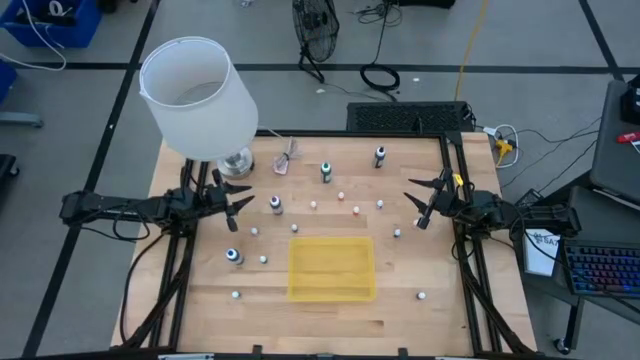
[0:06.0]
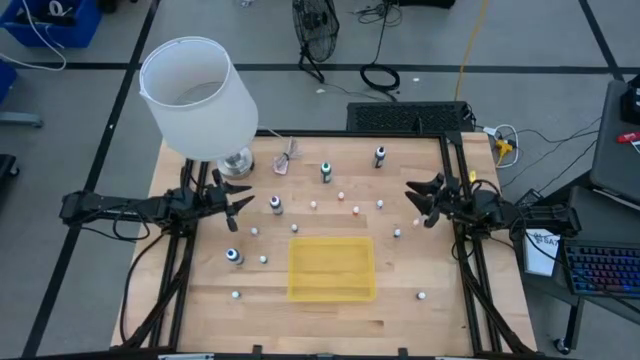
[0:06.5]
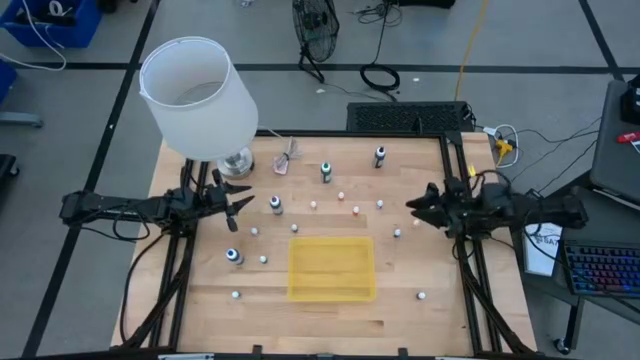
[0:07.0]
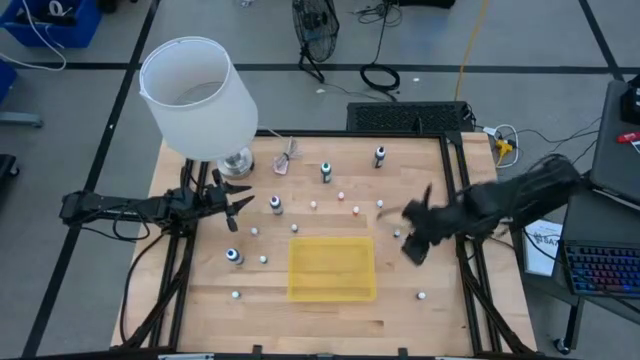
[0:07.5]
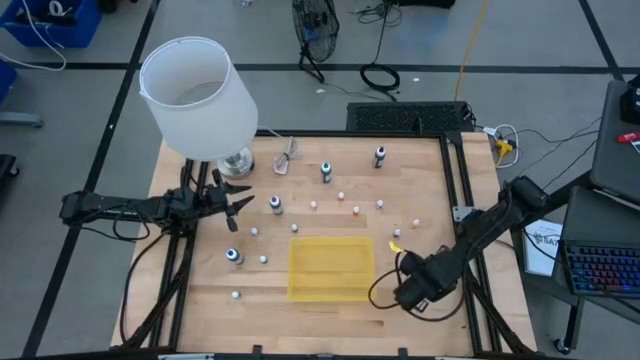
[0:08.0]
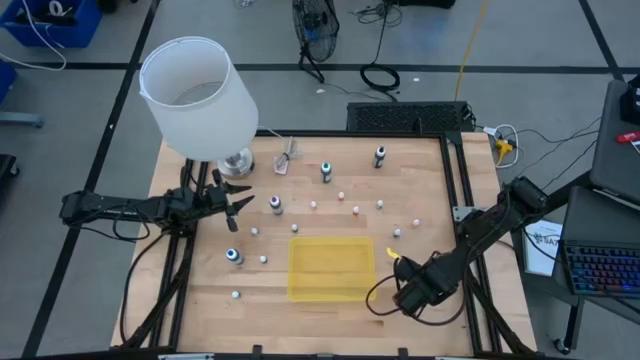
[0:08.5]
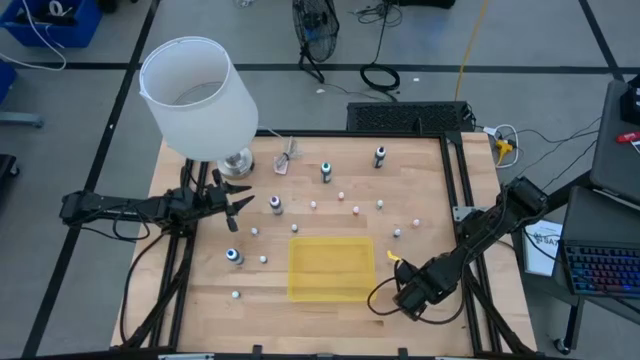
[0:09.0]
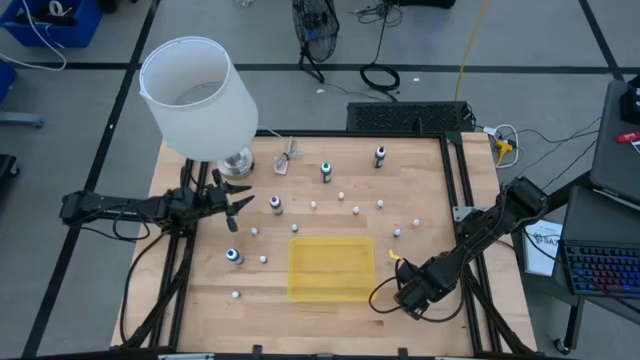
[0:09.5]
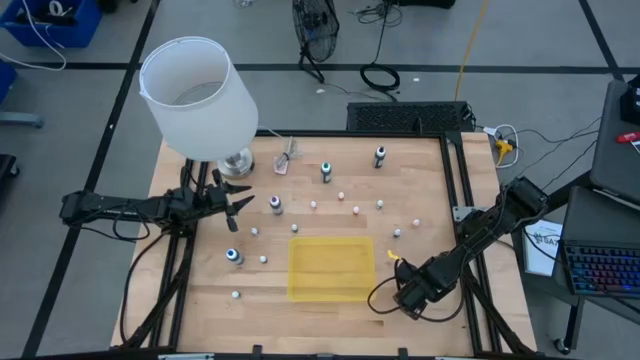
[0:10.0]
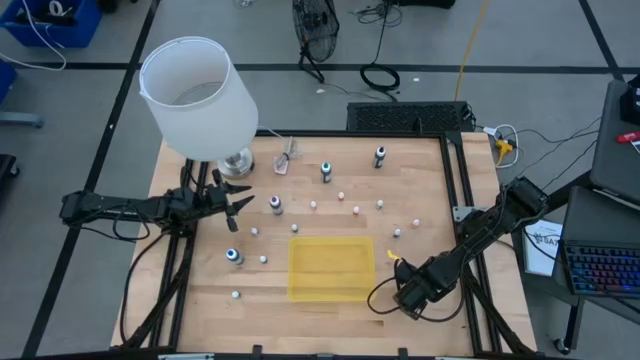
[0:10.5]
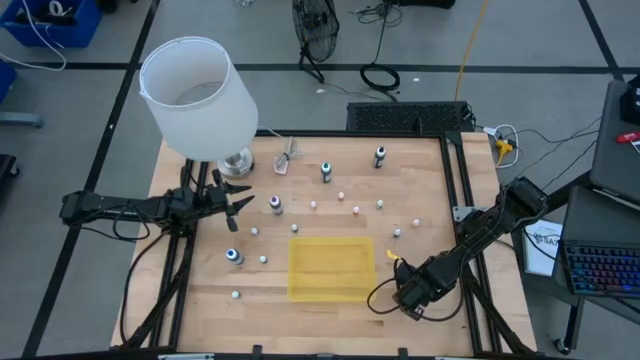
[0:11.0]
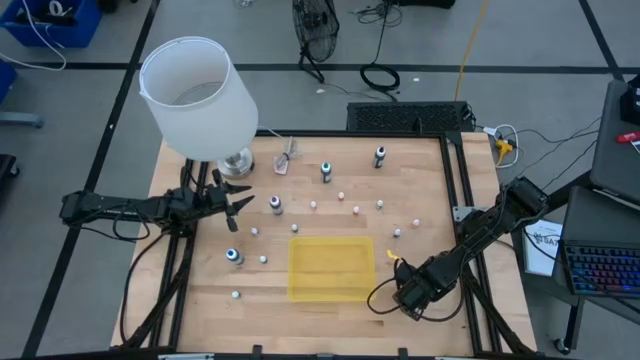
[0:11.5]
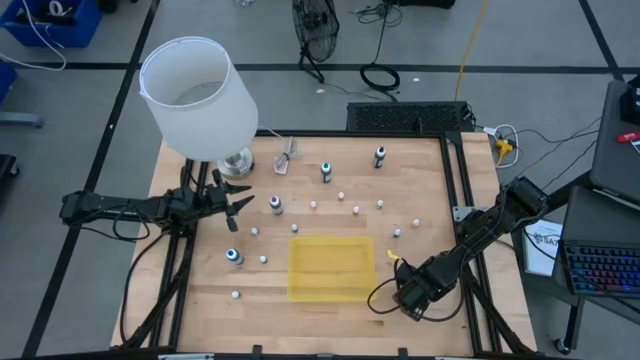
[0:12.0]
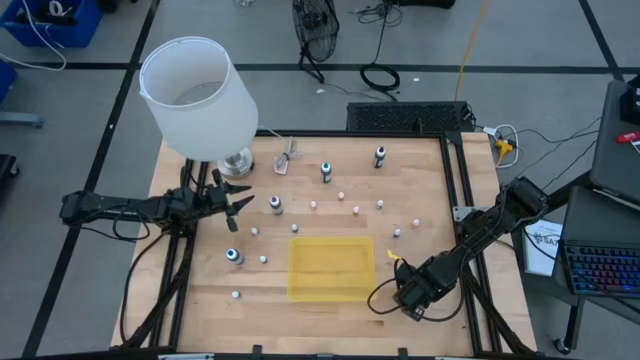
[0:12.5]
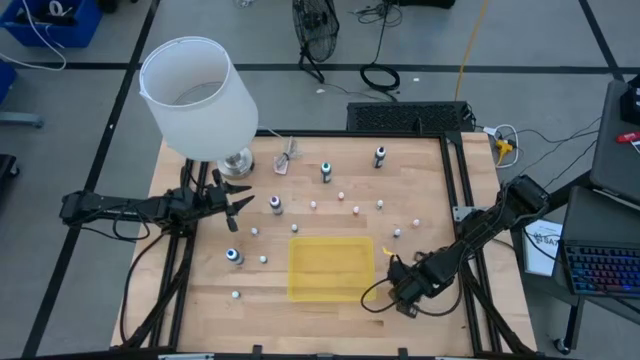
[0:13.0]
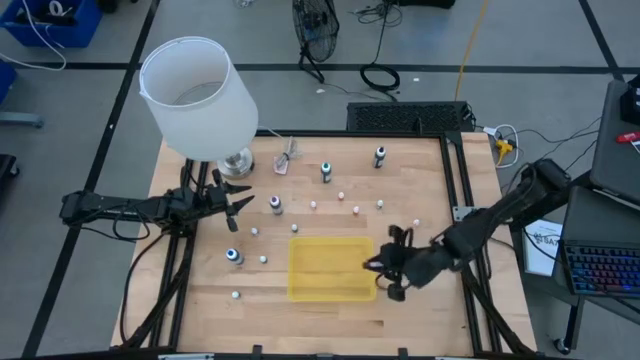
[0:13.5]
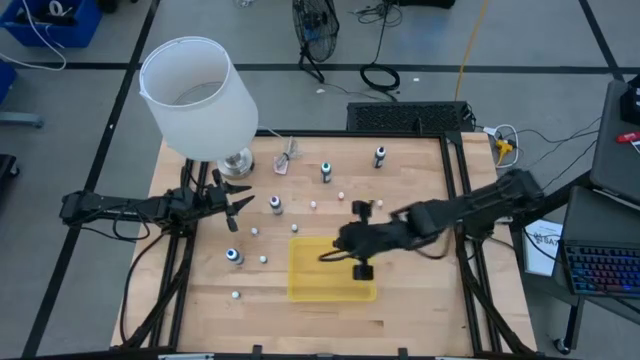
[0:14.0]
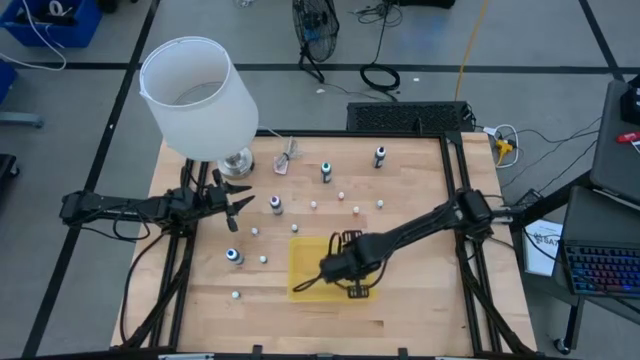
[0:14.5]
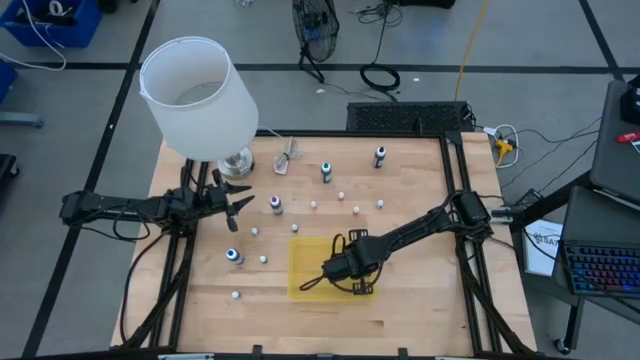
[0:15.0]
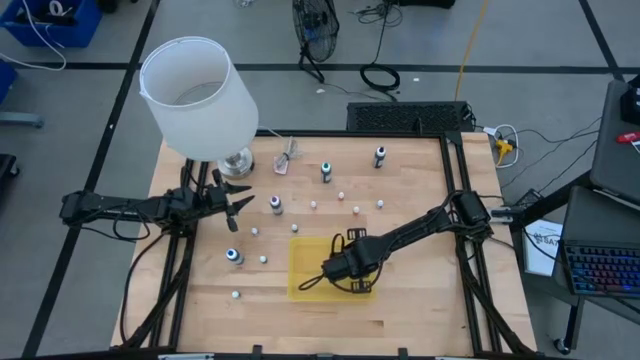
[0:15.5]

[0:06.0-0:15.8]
Task: Pick & Place food coloring
Put the small red food coloring bottle into the yellow container

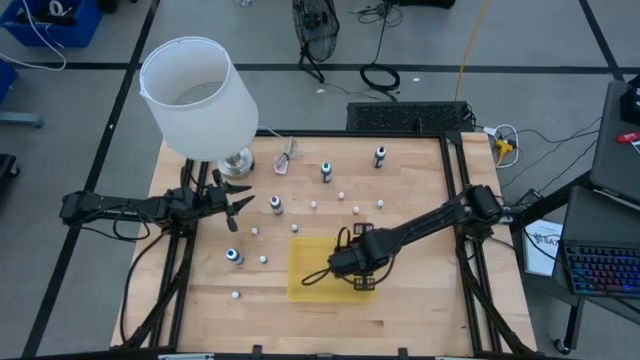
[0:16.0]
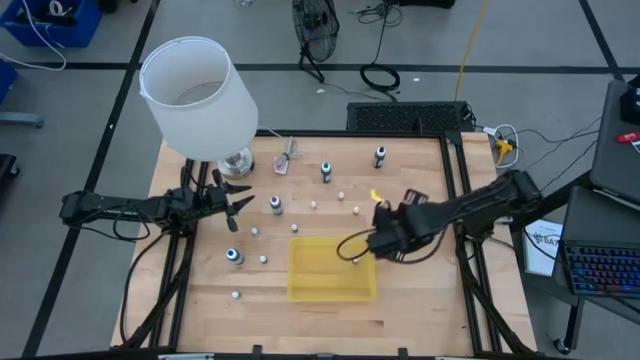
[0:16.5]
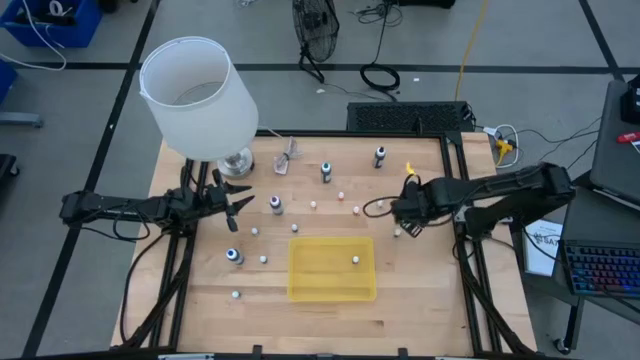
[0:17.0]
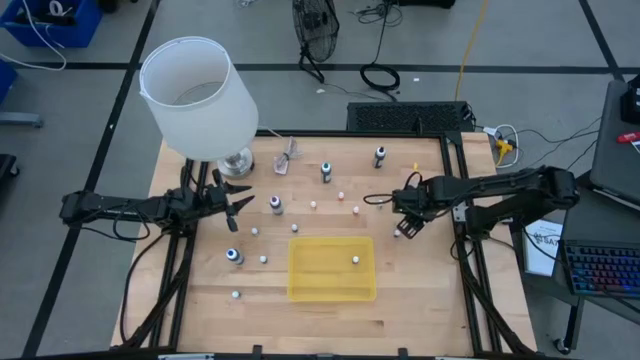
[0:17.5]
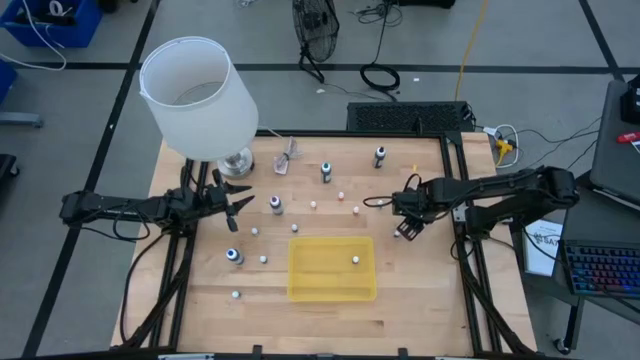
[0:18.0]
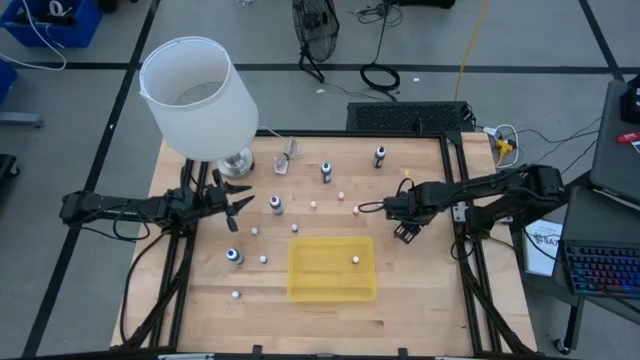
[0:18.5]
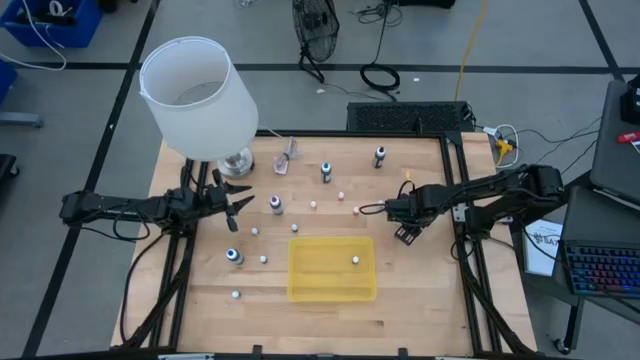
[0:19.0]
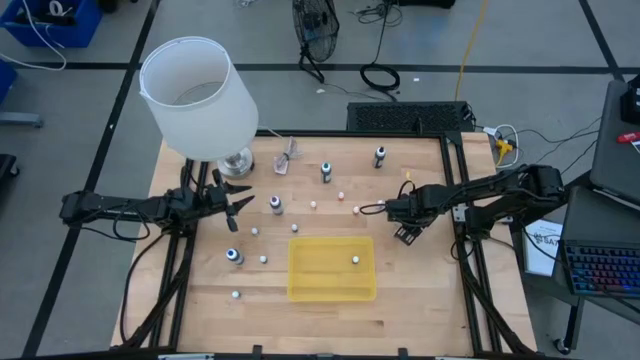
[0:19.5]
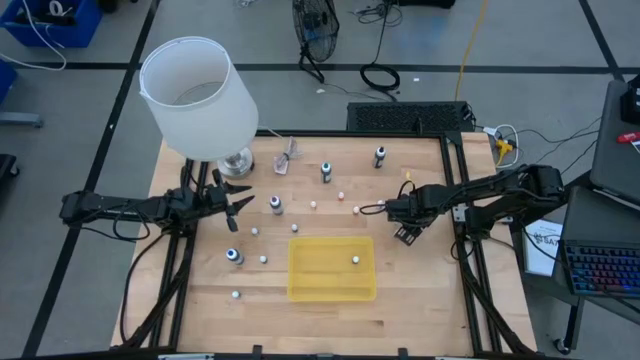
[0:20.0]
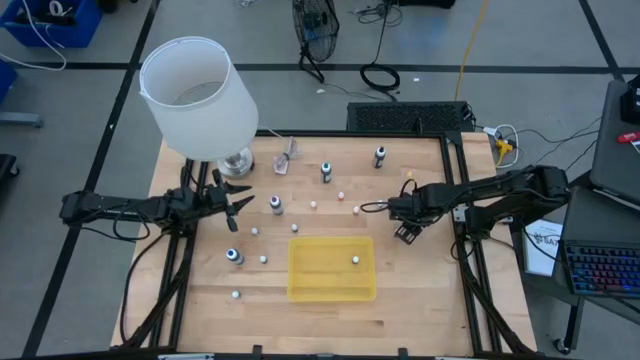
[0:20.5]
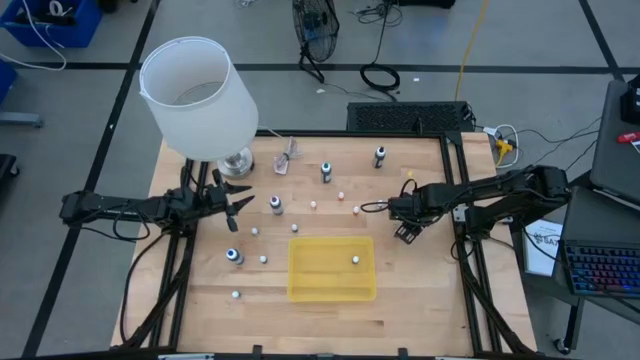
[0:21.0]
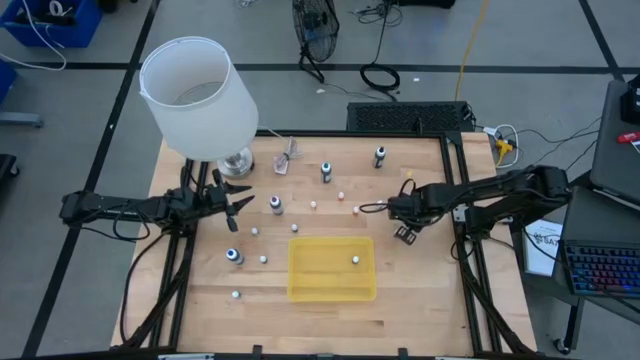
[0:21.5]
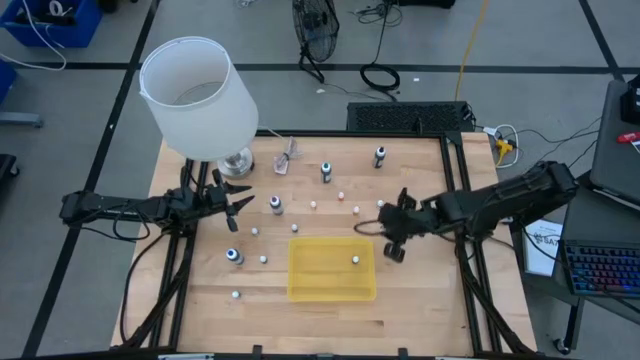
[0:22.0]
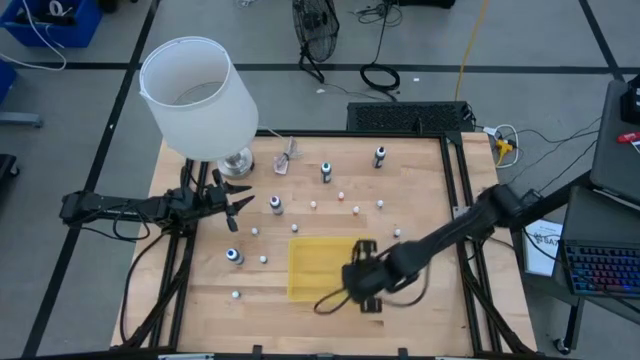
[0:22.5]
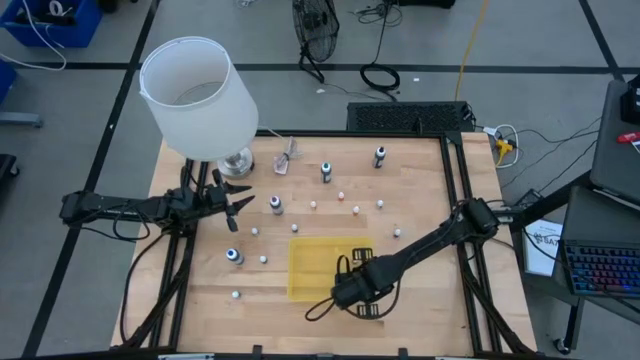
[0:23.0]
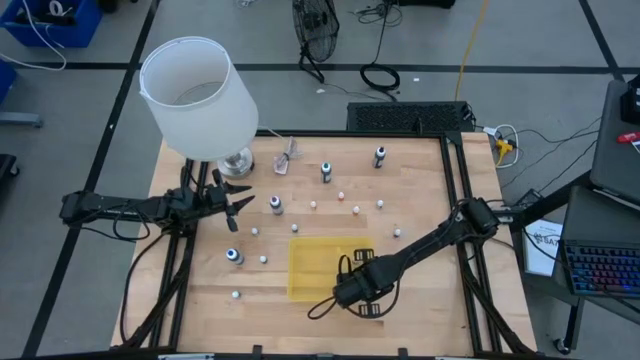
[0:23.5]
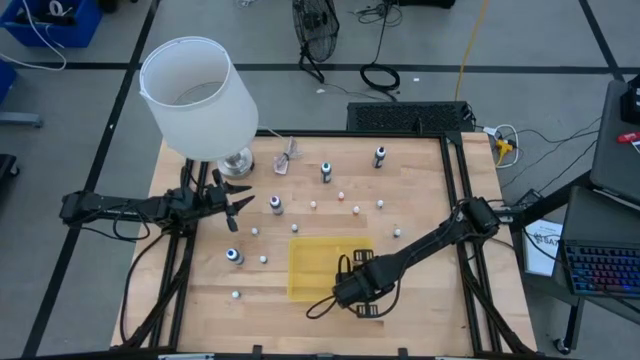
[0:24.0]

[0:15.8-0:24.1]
Put the small orange food coloring bottle into the yellow container
